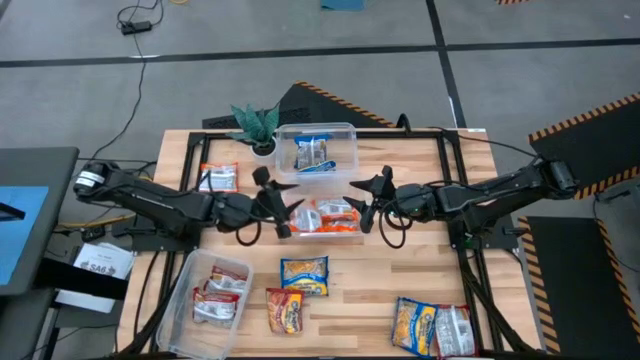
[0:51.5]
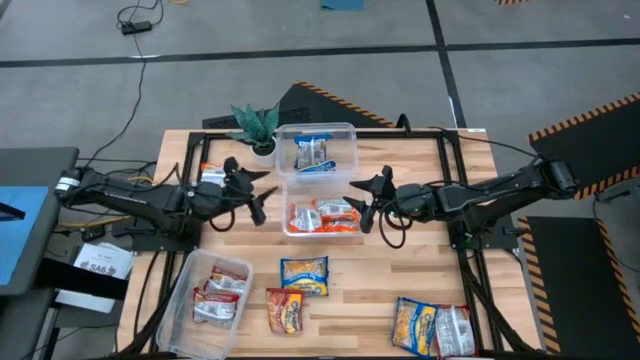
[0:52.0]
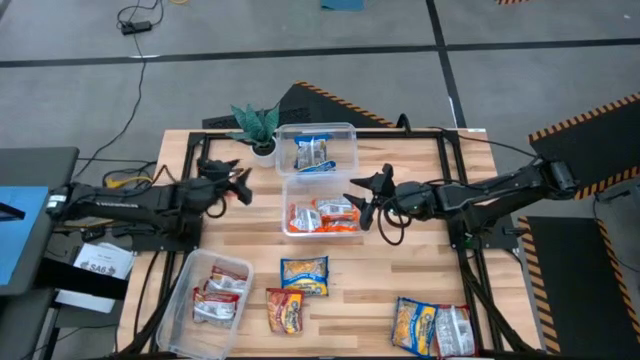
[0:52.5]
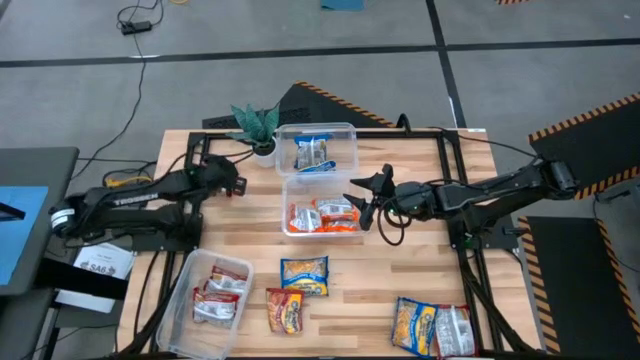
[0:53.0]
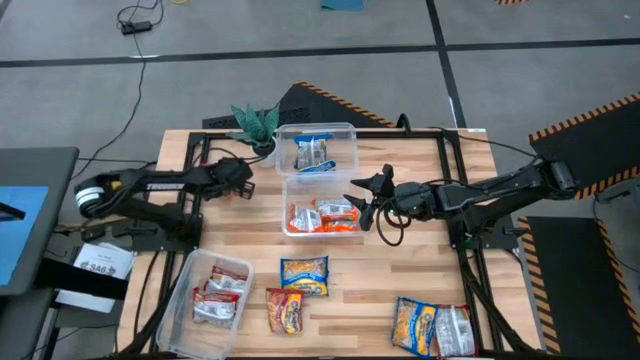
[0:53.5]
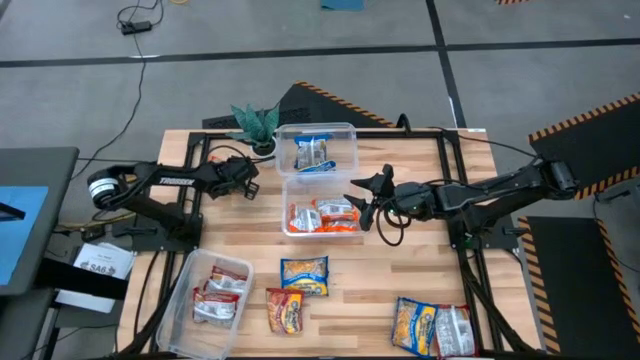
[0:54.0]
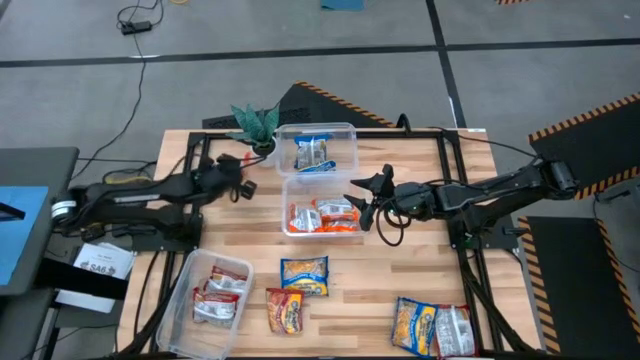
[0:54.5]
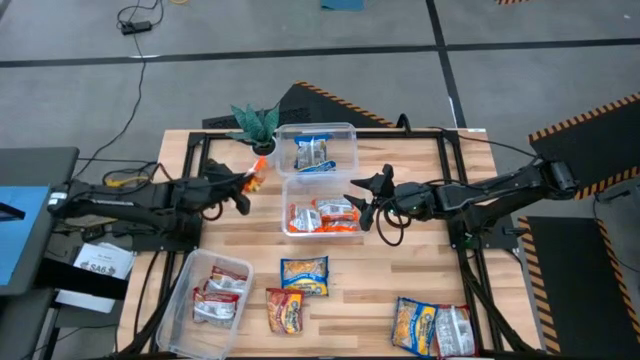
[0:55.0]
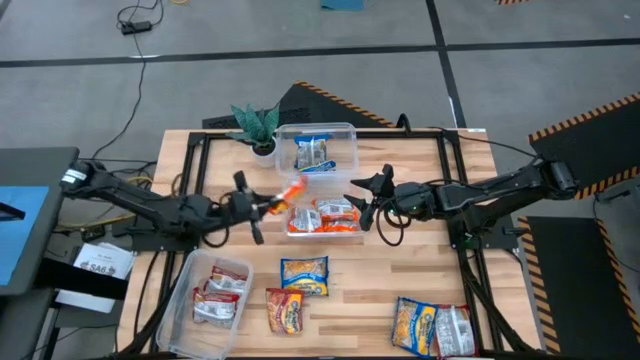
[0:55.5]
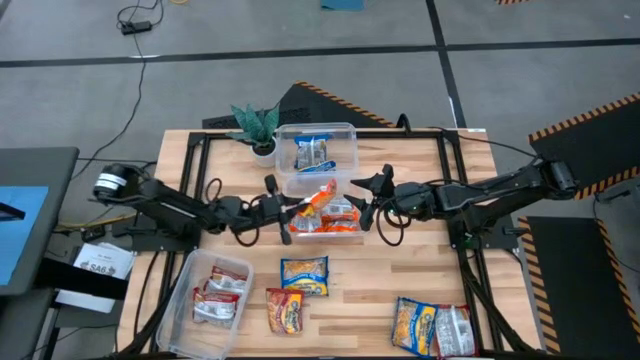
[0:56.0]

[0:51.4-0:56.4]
Task: Sort Maruchan noodles
Put the orange noodle pack into the middle transparent bin

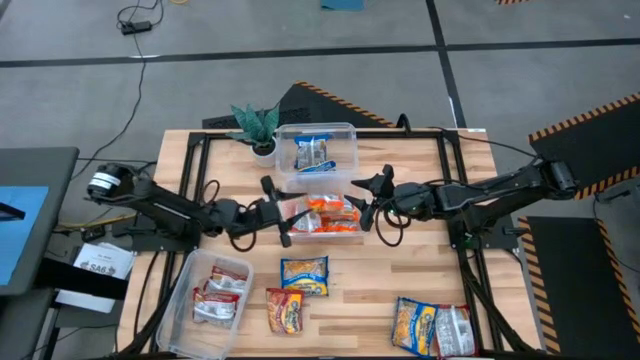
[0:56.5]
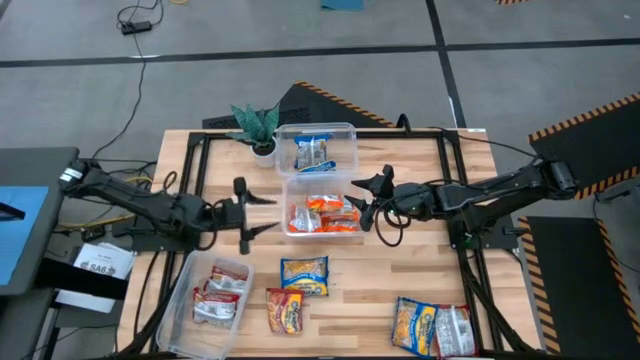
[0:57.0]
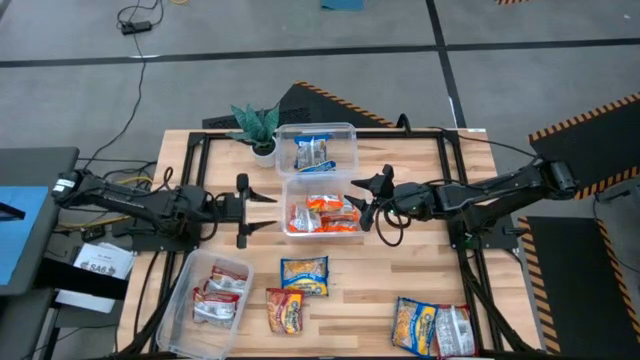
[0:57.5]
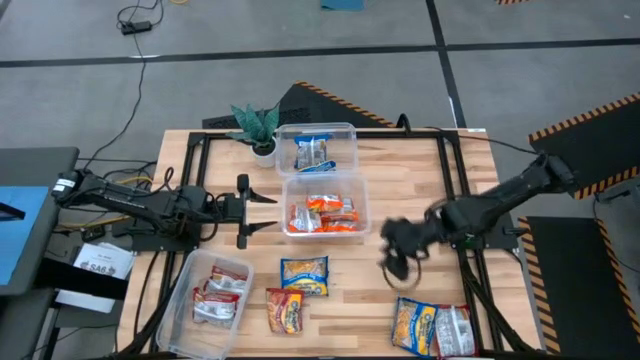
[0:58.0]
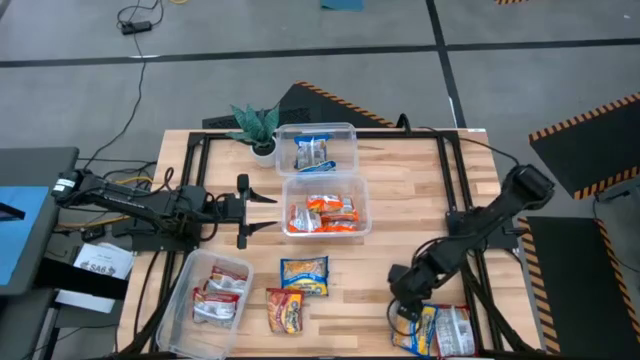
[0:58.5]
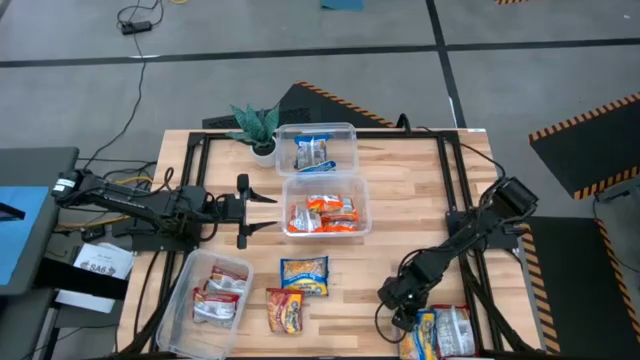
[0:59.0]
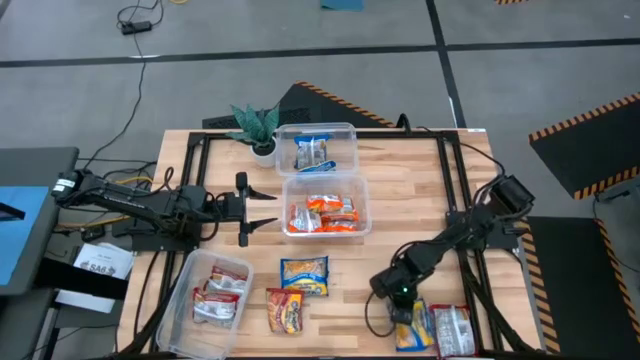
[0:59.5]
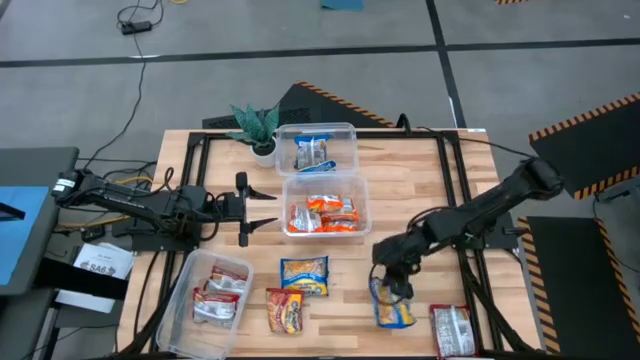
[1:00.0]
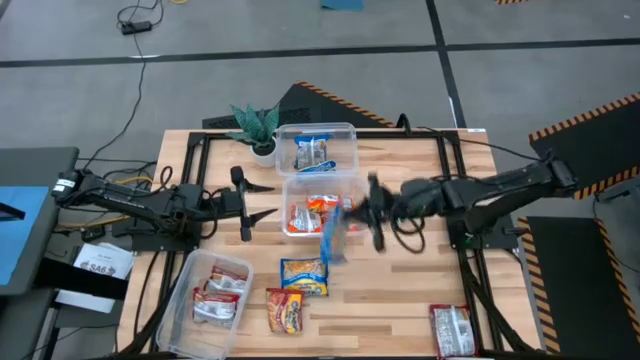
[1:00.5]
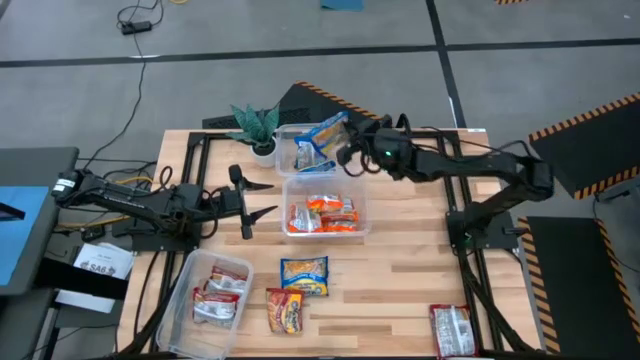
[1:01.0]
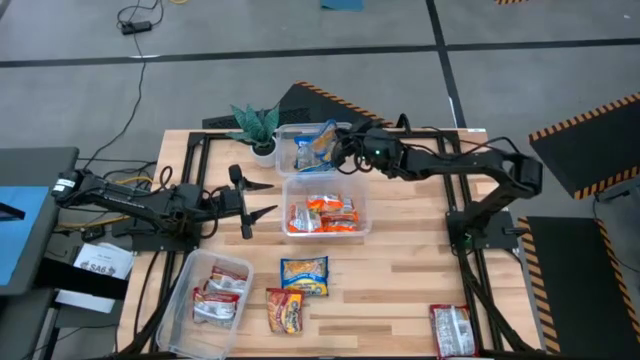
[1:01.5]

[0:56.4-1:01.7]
Put the blue noodle pack into the top transparent bin

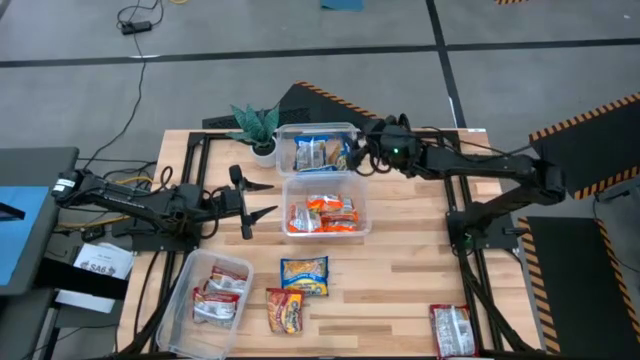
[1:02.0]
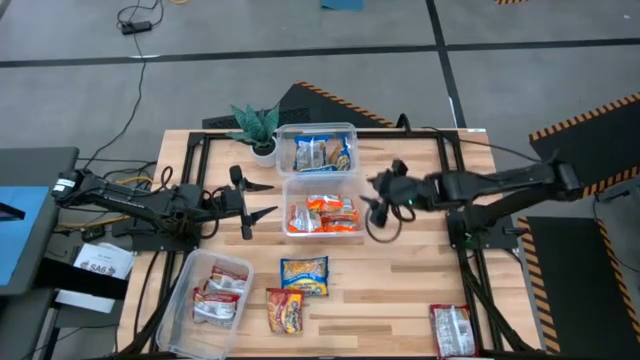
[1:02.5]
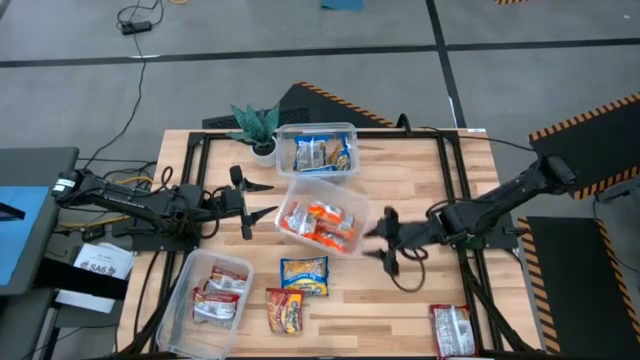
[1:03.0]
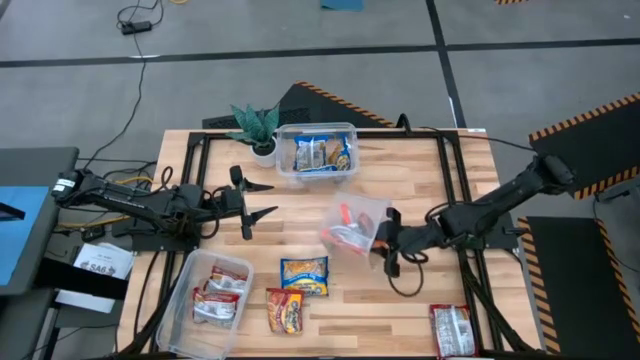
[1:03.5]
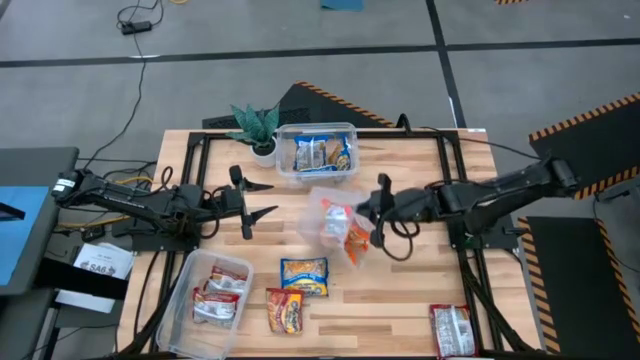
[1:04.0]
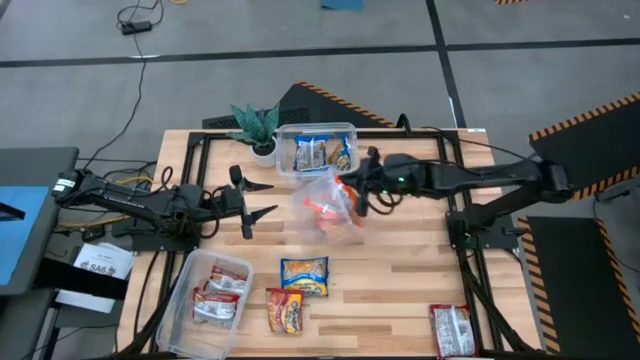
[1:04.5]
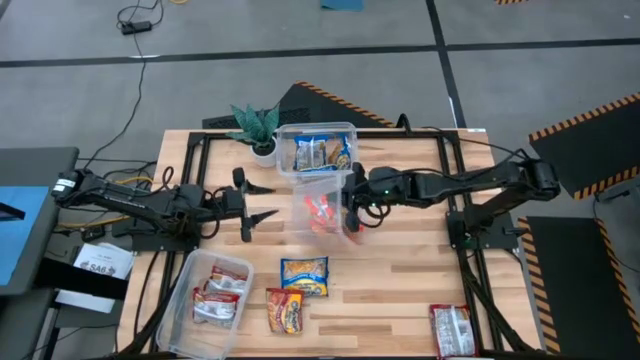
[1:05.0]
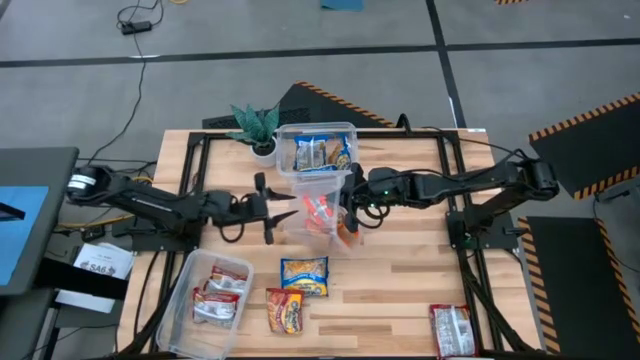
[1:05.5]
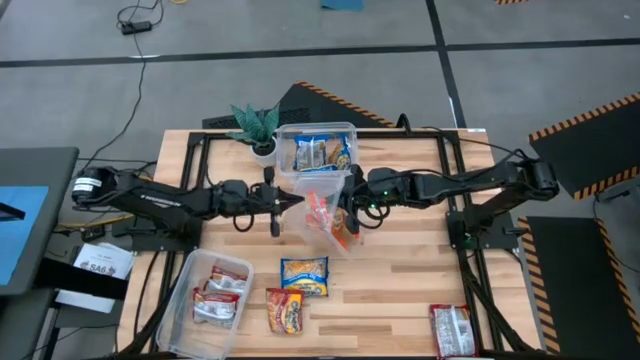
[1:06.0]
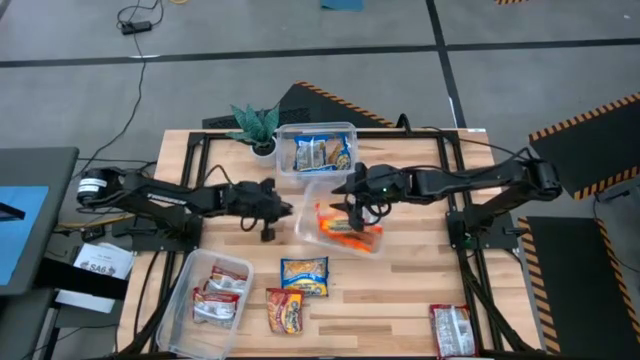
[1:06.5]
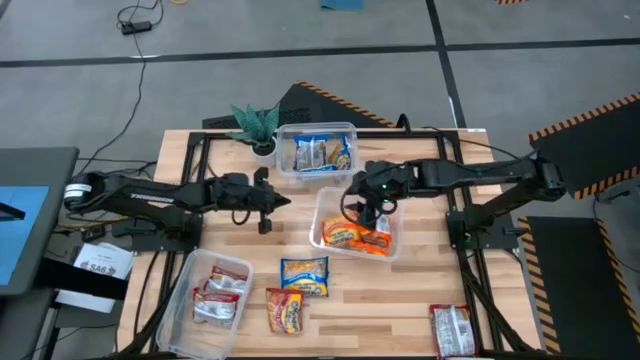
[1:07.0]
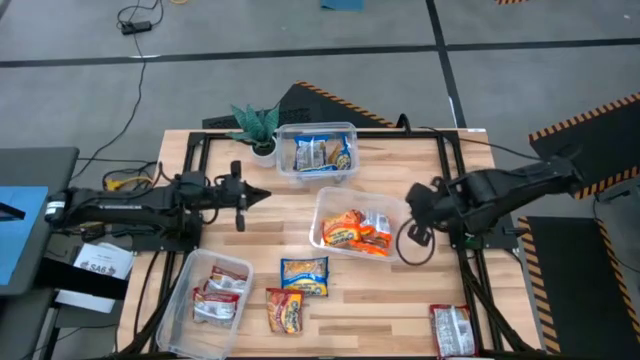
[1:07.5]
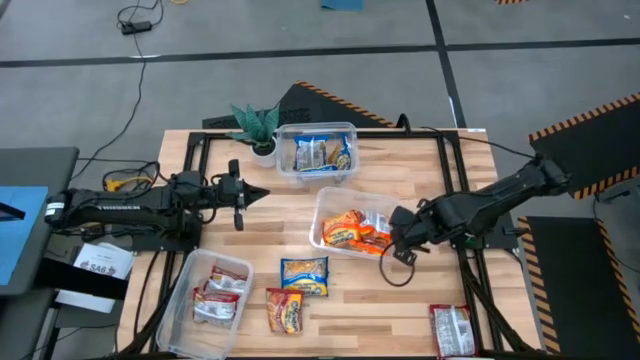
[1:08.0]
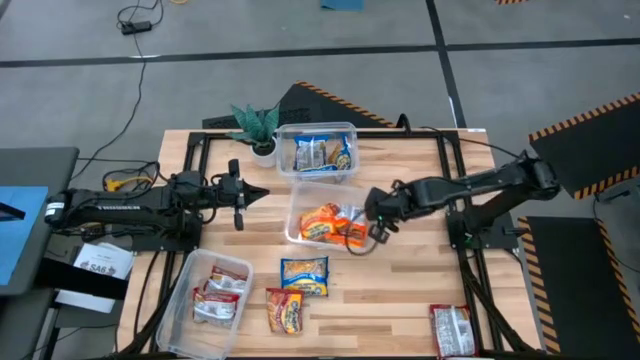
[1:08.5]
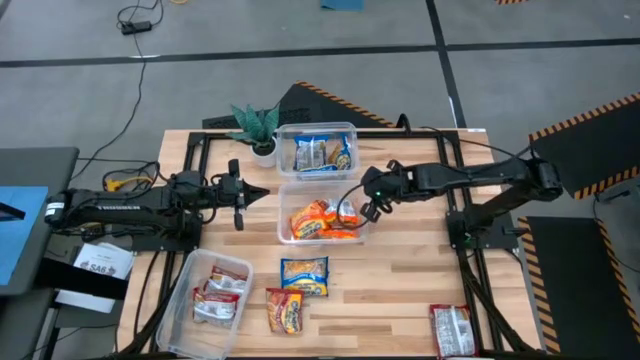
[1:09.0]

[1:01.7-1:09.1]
Adjust the middle transparent bin on the table

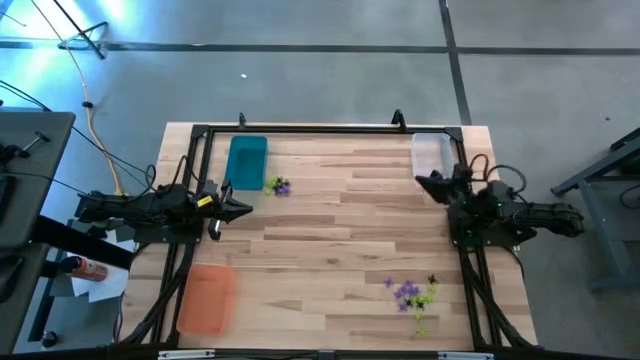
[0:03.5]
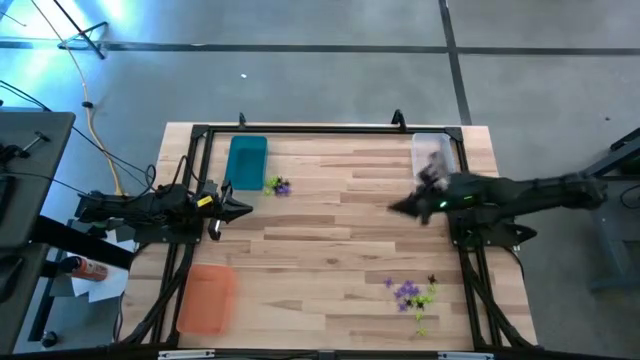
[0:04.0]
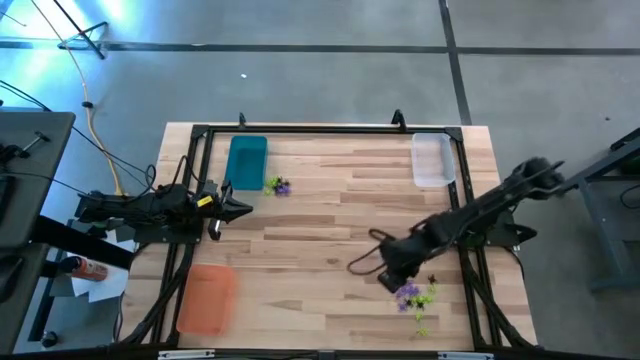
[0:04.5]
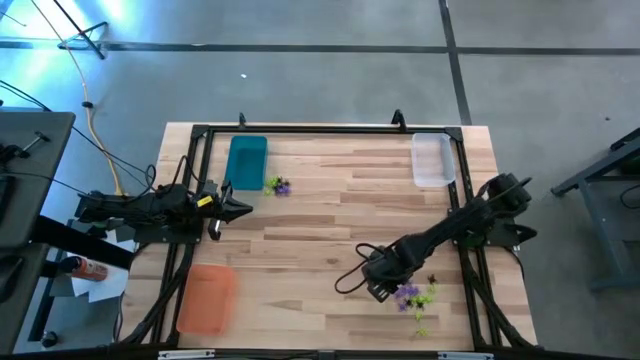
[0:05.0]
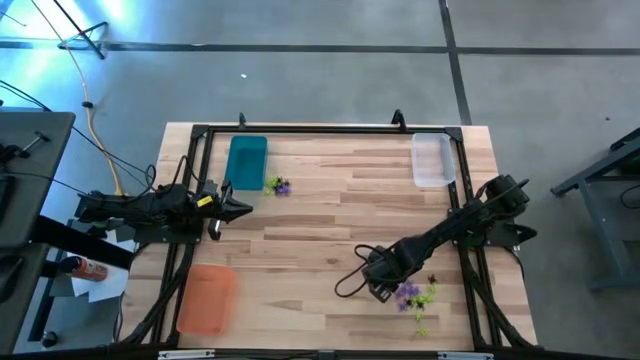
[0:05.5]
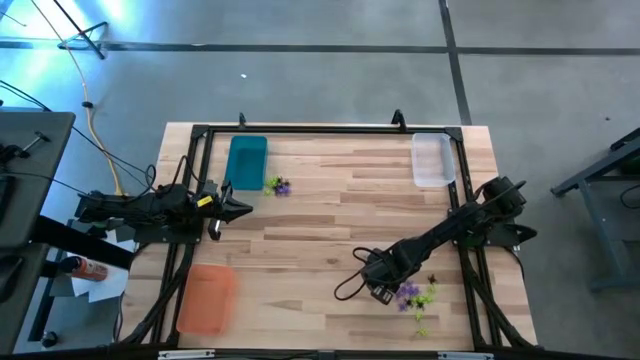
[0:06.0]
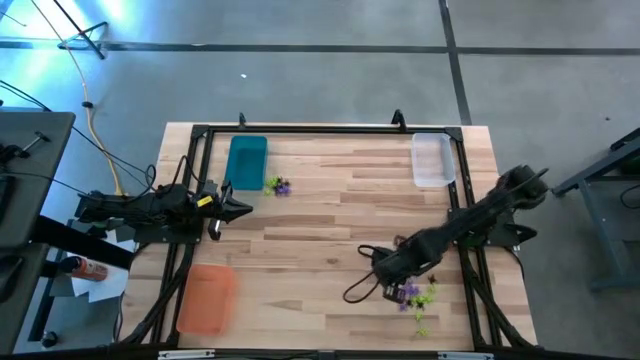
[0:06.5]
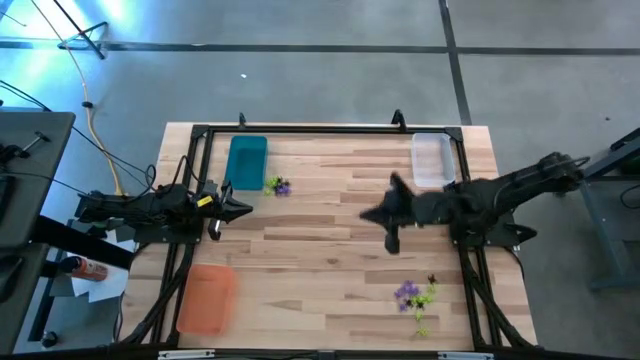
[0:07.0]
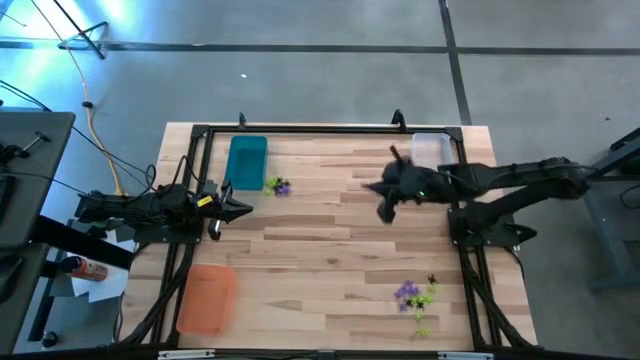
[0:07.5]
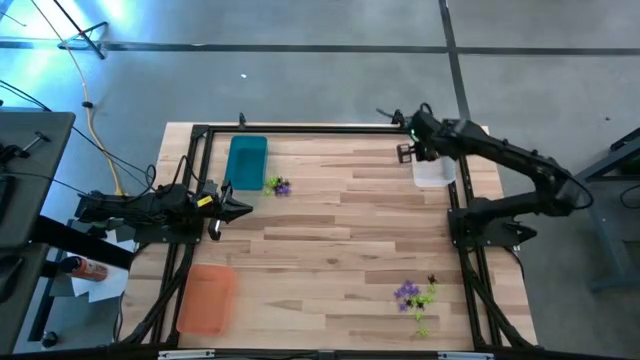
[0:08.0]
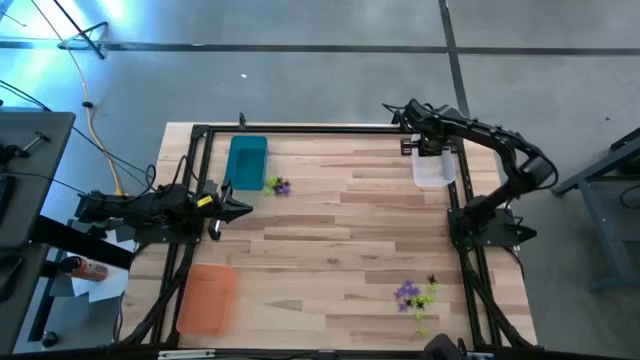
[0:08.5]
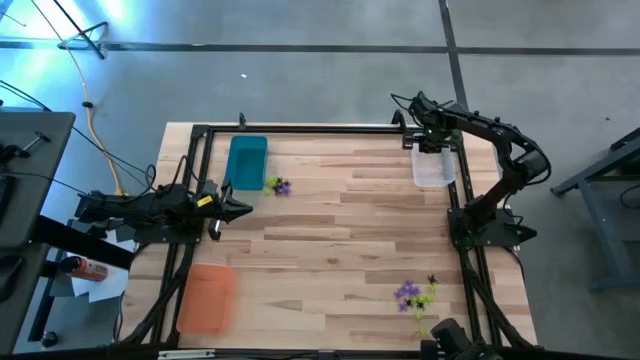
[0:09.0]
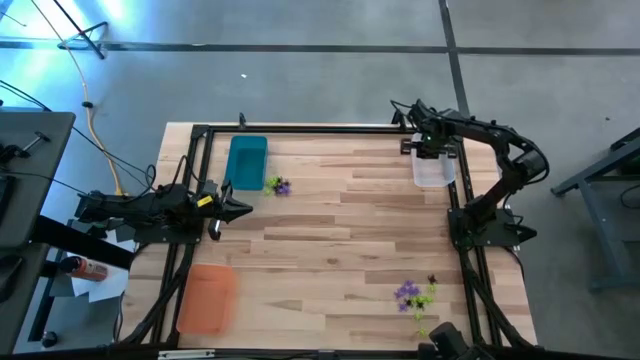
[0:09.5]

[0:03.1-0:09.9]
Task: Sort Halloween decoration
Put the purple spider toy into the transparent bin
